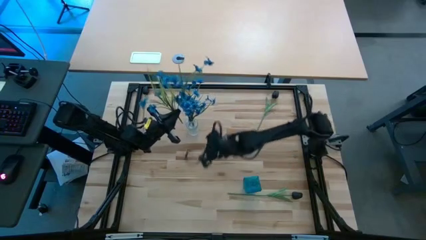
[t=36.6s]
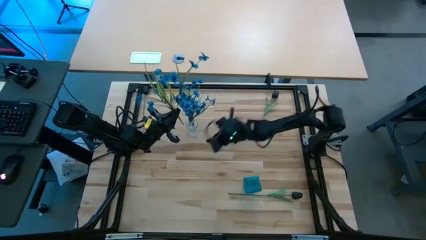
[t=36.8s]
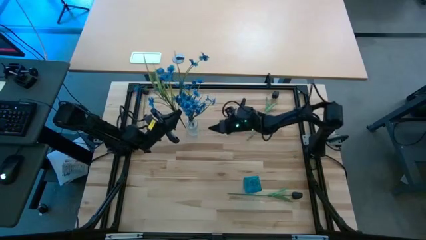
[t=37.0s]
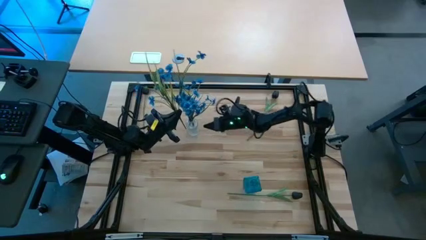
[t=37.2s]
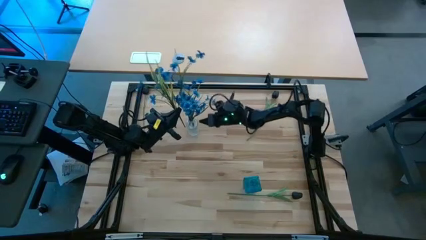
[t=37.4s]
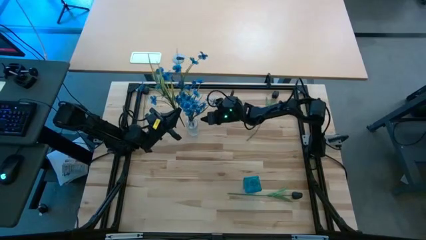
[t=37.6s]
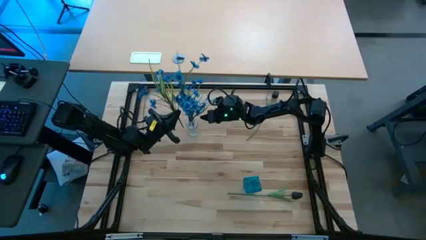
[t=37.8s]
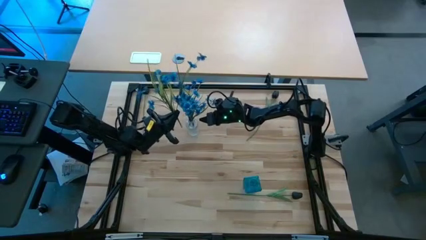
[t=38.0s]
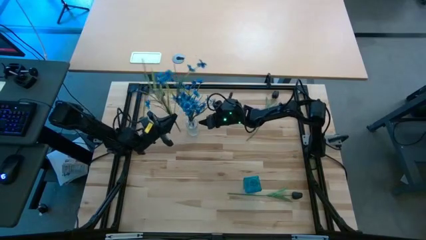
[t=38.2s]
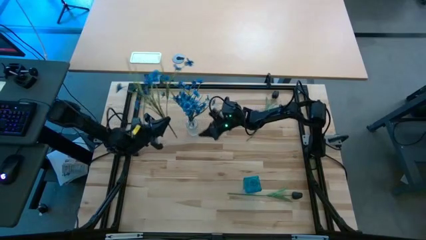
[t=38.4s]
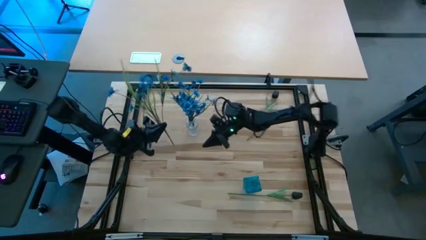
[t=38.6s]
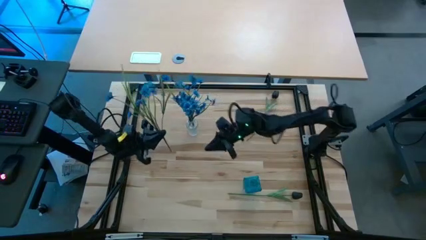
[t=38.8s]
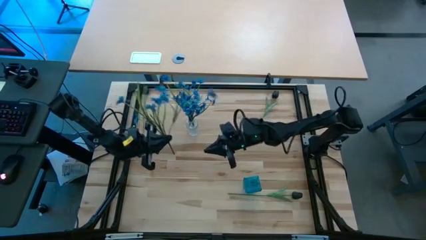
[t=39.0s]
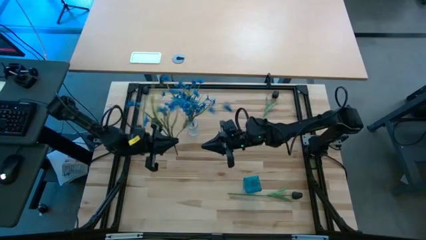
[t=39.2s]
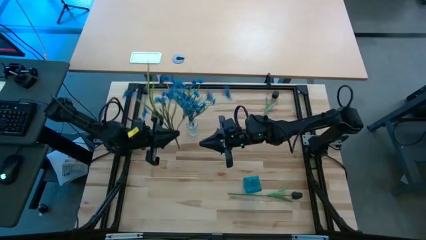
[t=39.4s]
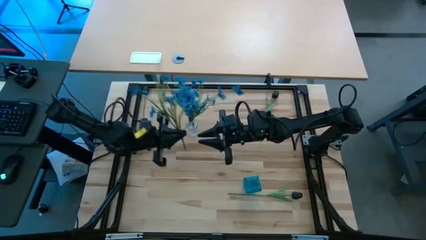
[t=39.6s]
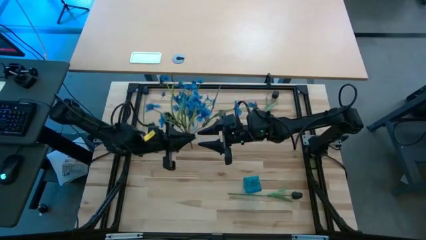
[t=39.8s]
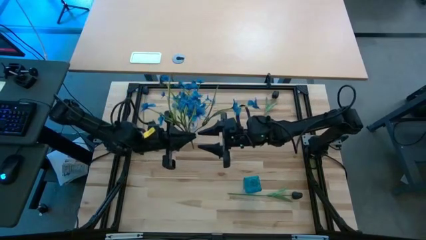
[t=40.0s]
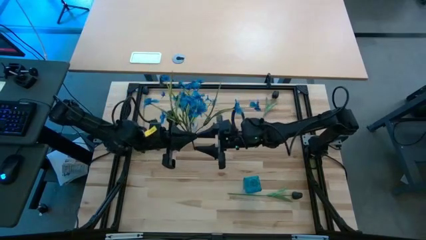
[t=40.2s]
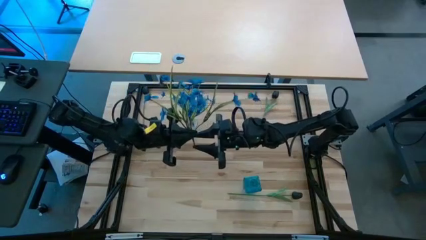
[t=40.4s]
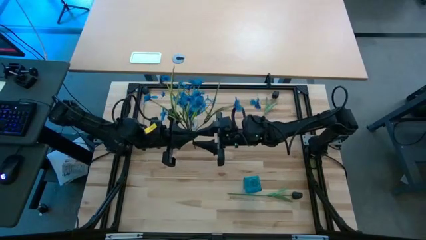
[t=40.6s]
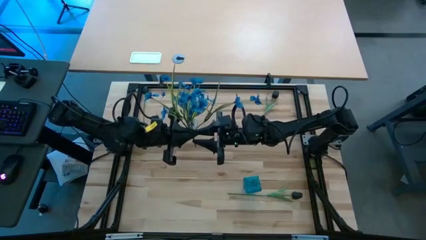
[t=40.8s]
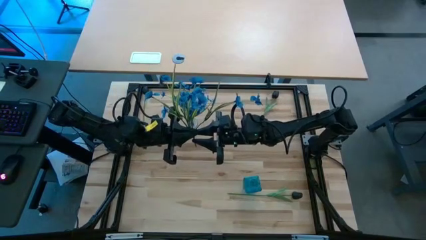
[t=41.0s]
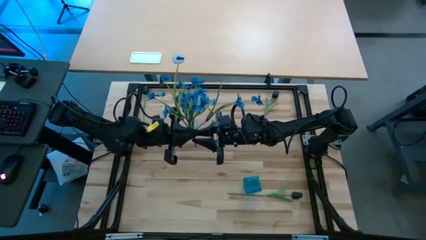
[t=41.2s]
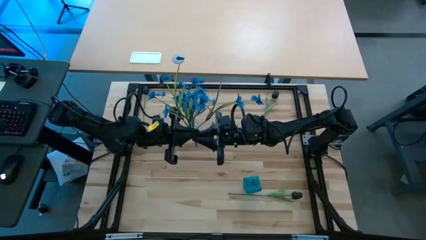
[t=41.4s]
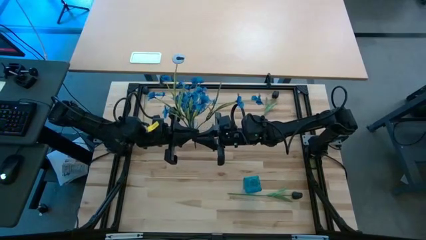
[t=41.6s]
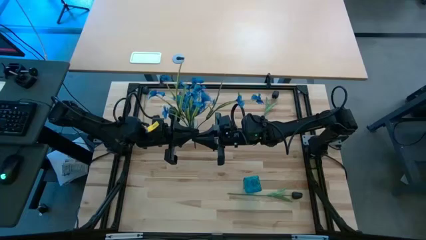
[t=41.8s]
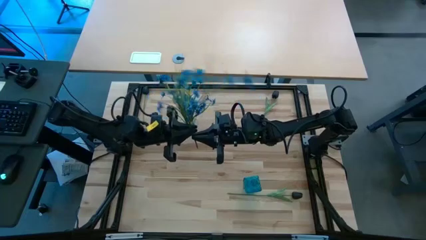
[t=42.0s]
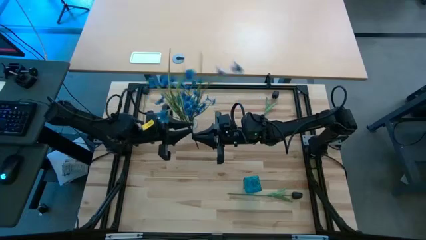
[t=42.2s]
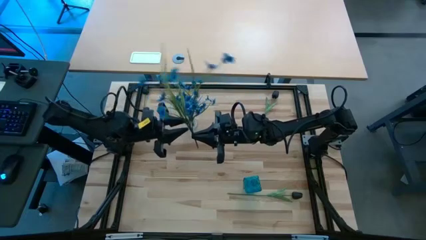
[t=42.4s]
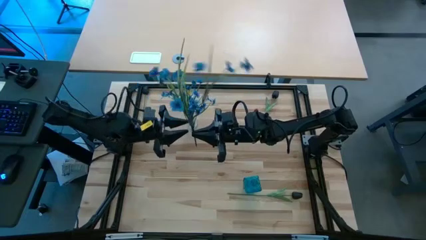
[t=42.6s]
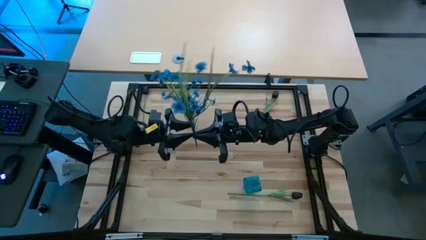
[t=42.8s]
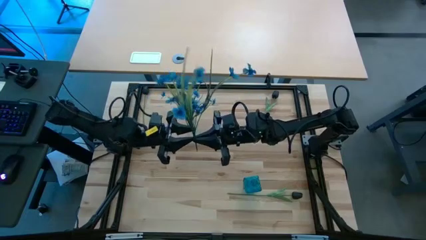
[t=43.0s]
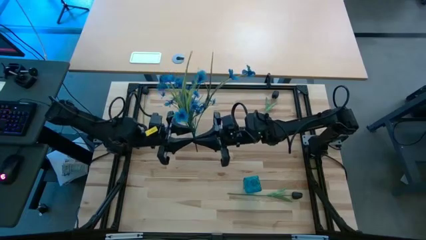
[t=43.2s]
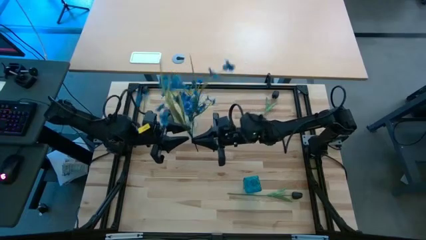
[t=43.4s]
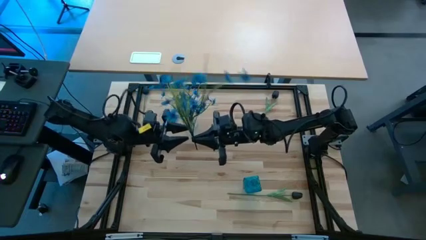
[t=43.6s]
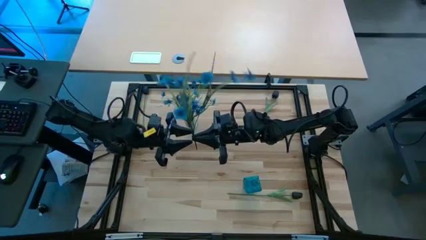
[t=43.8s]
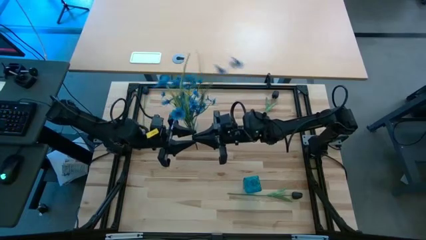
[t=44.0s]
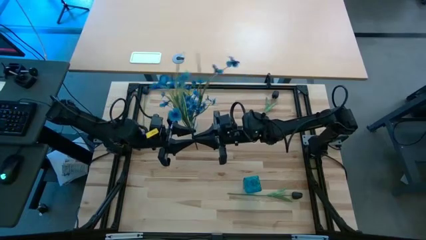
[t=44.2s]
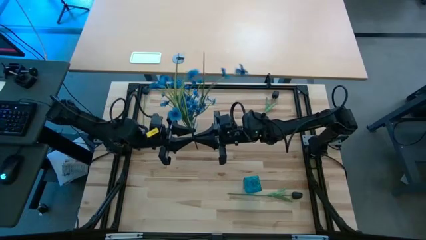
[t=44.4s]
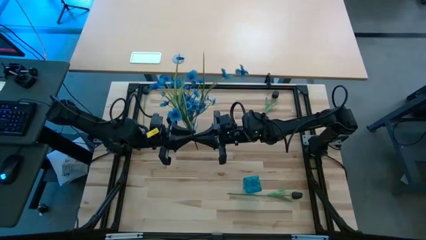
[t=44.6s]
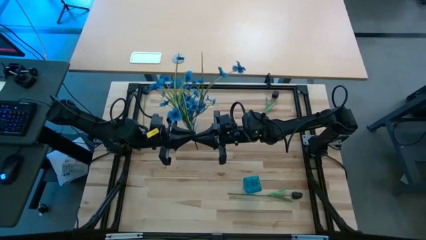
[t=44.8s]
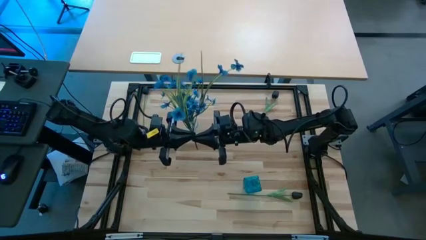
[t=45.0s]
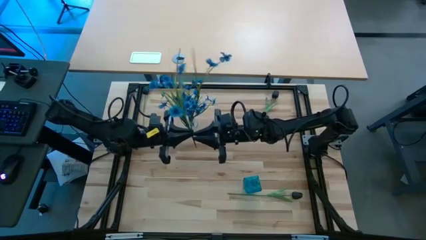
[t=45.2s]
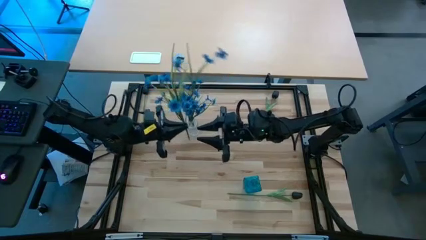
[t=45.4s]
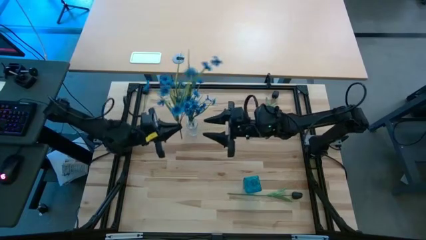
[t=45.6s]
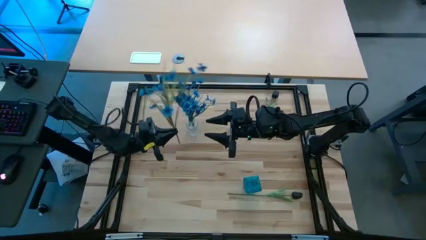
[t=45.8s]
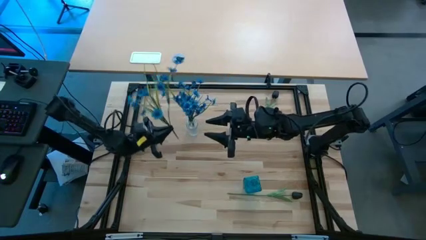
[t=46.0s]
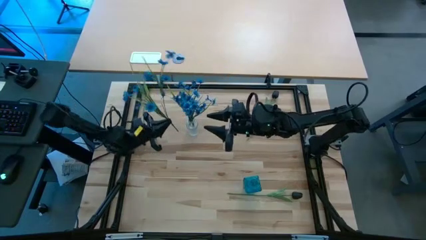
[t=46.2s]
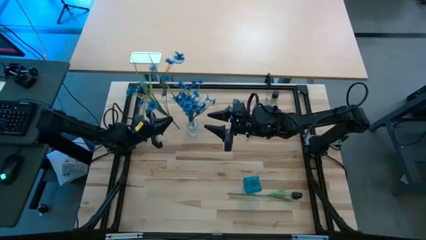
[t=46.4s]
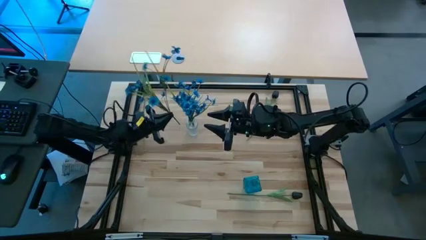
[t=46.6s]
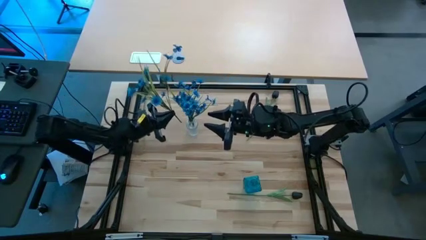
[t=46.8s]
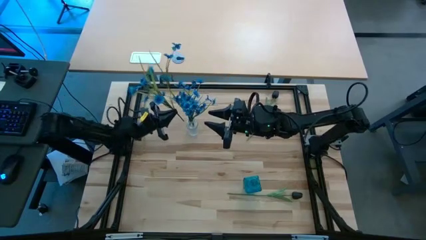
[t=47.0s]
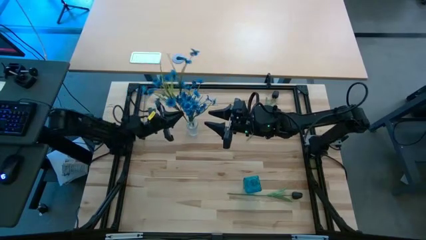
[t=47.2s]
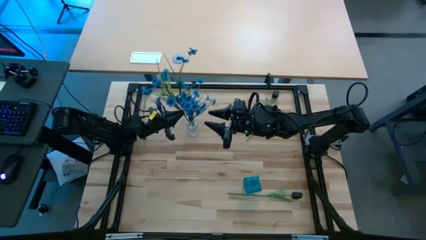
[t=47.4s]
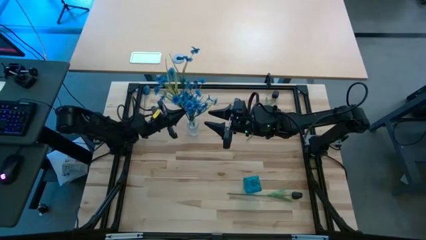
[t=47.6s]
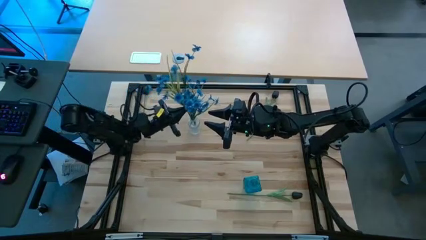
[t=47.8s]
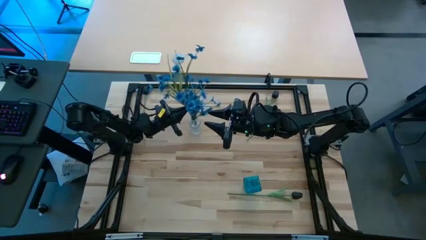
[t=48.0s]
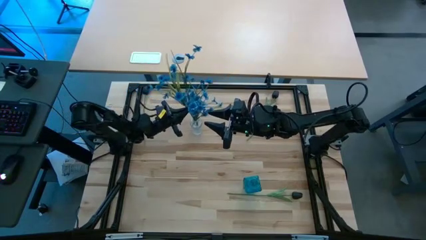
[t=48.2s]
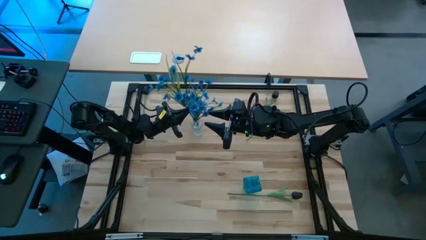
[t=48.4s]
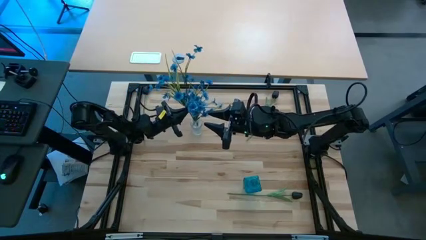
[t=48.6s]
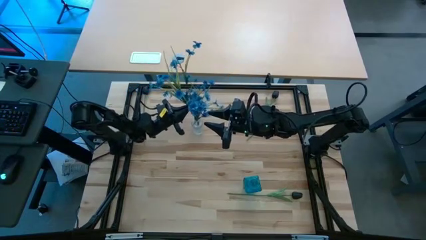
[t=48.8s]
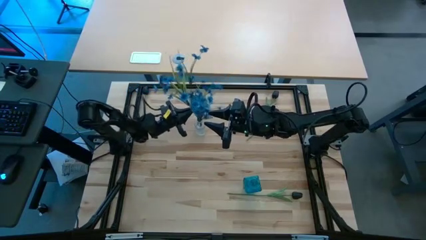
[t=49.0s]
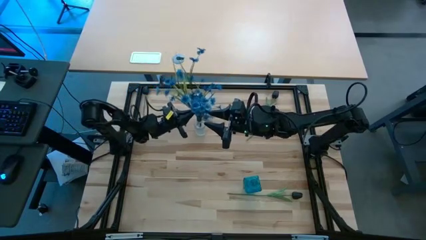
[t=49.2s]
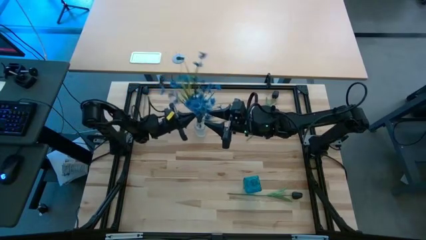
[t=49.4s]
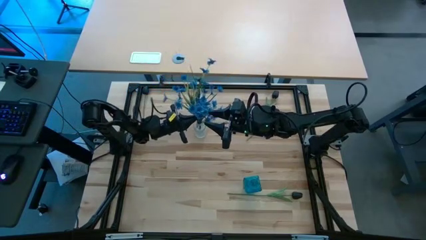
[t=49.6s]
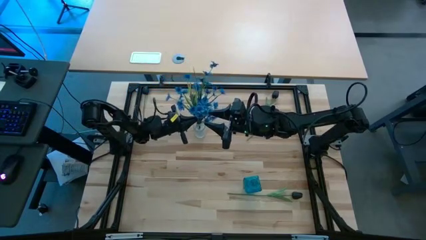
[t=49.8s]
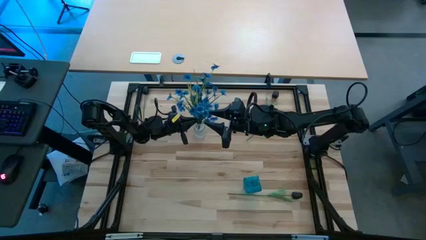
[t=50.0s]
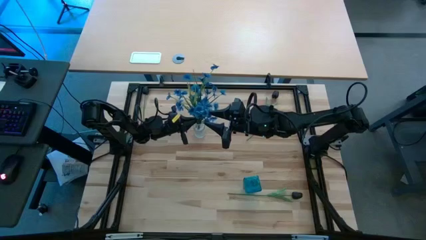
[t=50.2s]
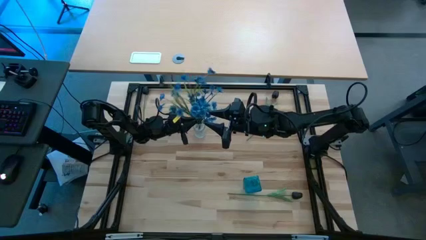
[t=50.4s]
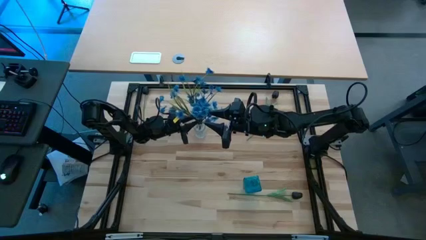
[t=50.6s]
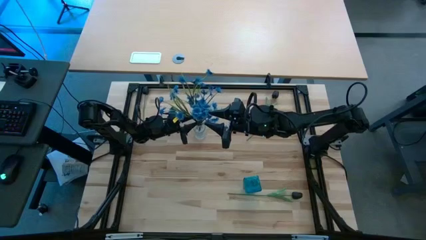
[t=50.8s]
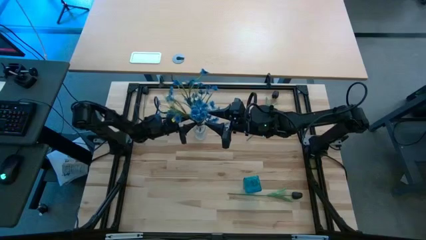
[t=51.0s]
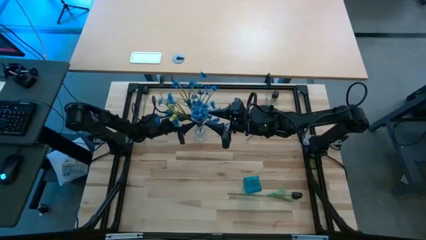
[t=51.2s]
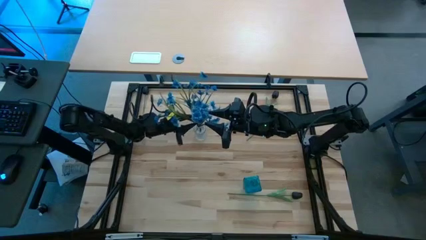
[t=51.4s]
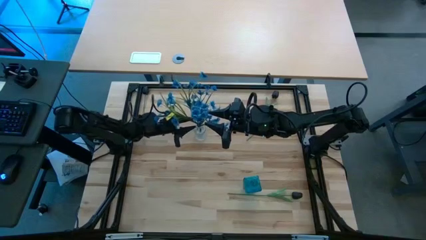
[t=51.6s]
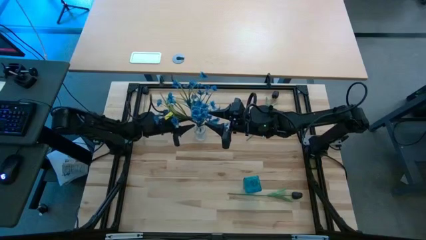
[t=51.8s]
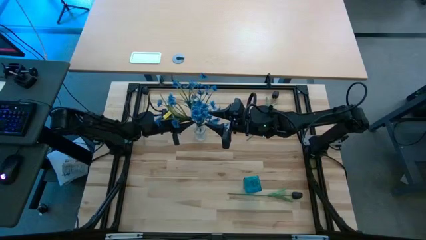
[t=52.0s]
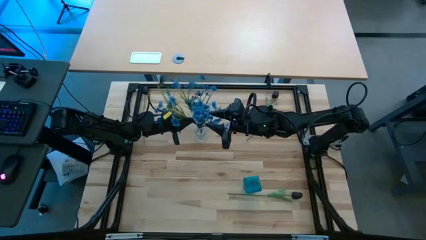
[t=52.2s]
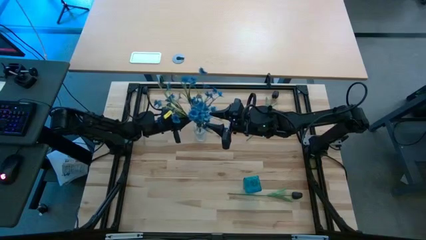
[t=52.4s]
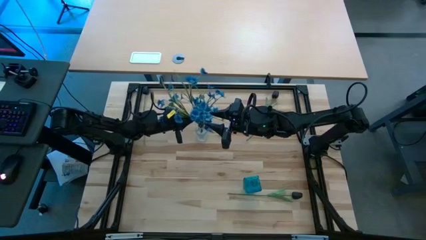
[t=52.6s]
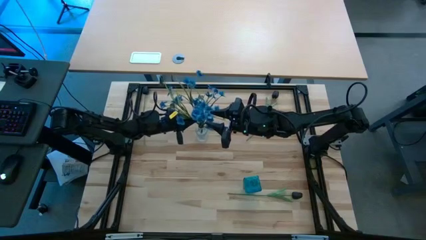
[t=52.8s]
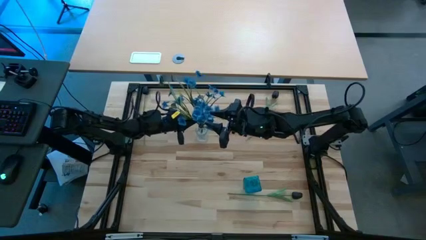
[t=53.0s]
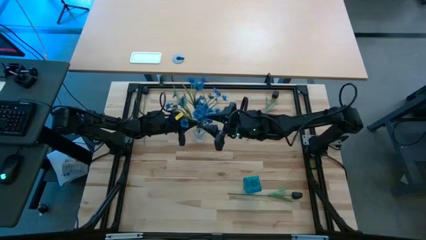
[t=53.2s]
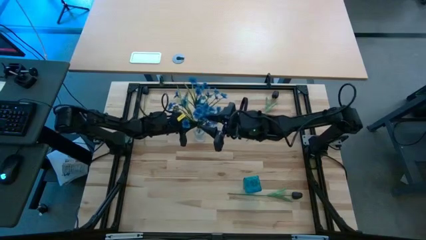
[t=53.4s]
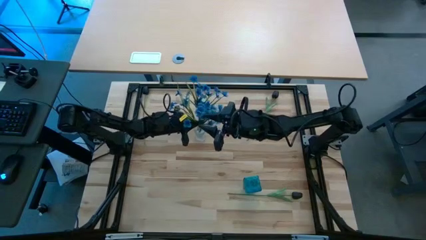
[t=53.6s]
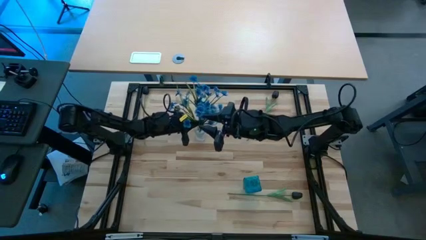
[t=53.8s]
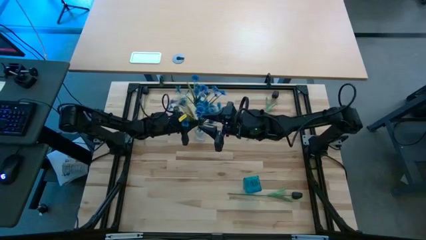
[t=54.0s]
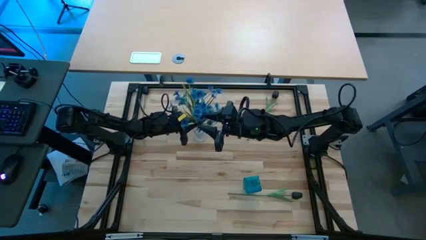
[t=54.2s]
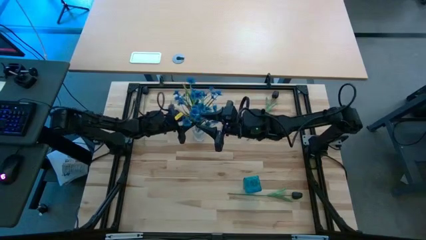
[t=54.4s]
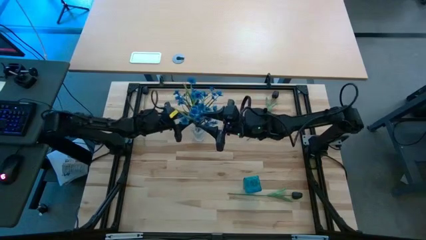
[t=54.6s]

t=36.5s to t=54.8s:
Task: Sort flowers into vase by color
Put the light blue flowers into the transparent vase
